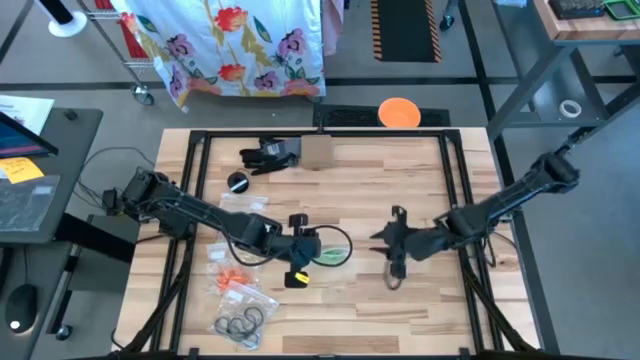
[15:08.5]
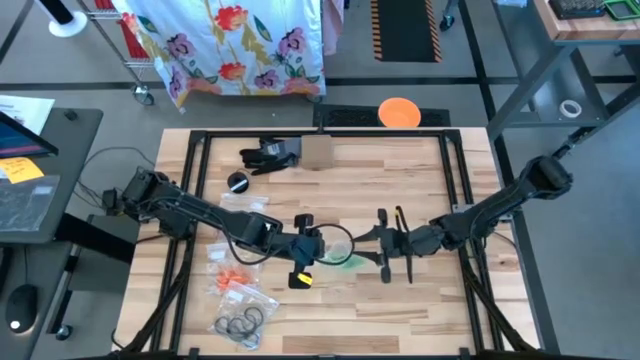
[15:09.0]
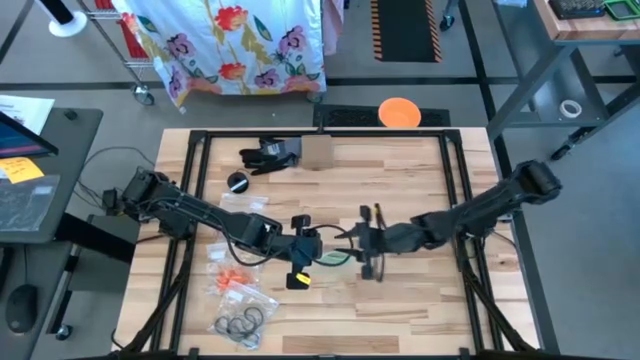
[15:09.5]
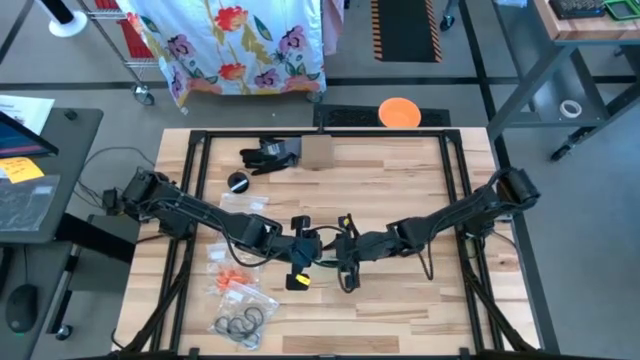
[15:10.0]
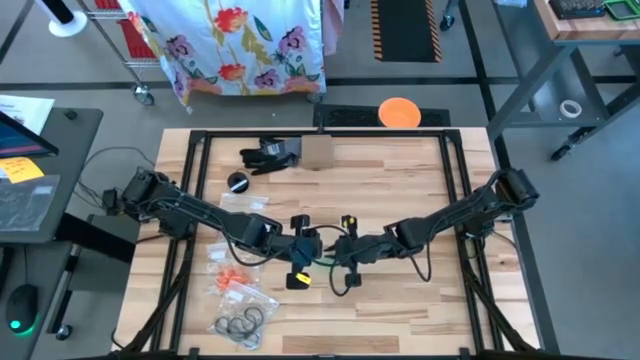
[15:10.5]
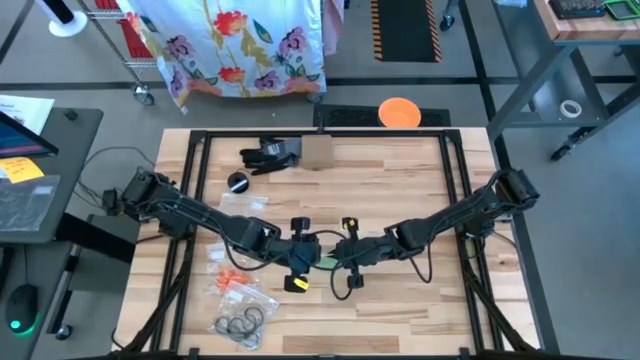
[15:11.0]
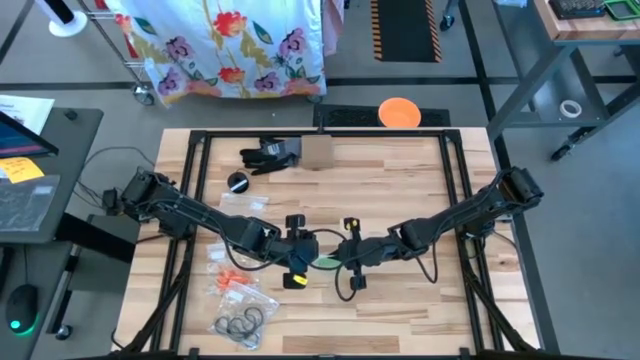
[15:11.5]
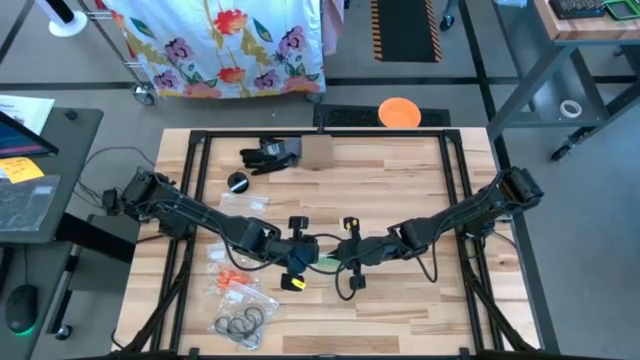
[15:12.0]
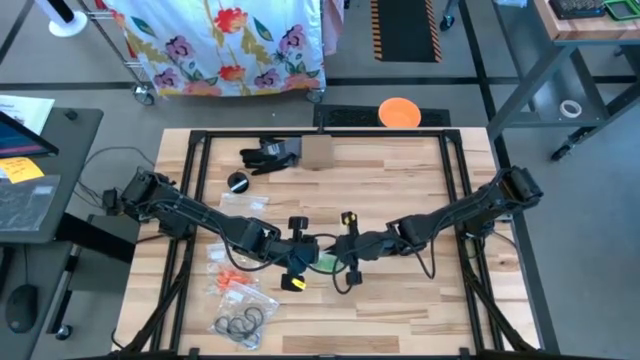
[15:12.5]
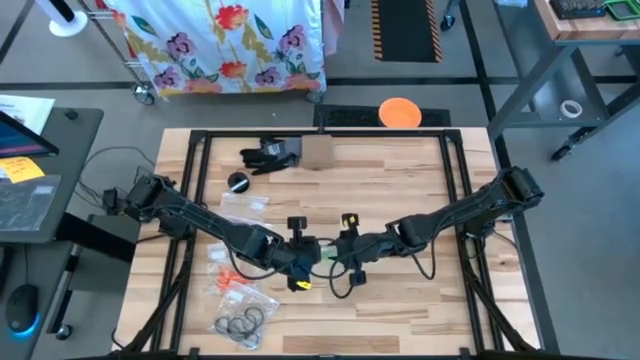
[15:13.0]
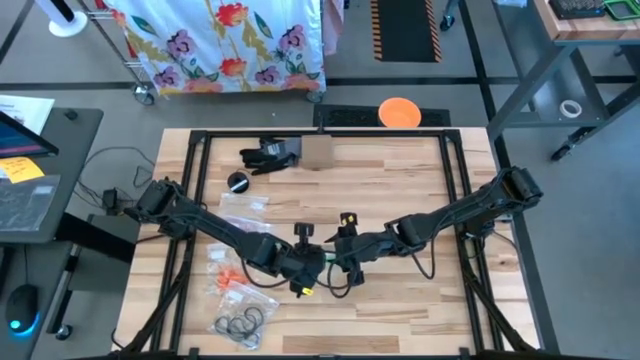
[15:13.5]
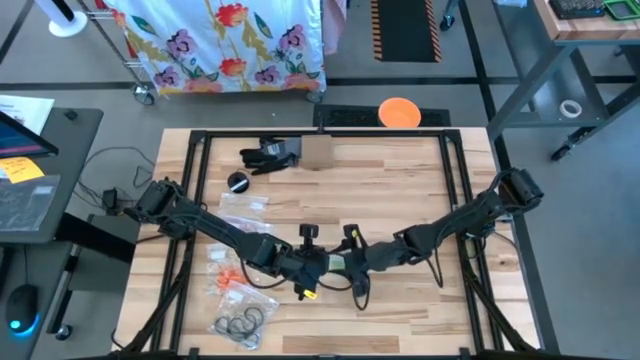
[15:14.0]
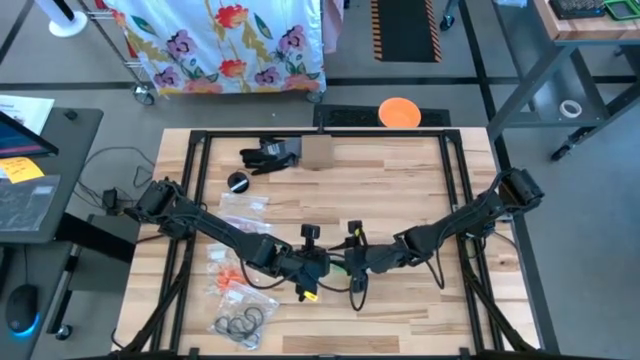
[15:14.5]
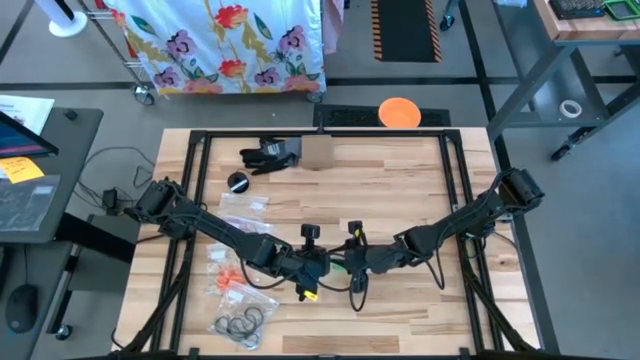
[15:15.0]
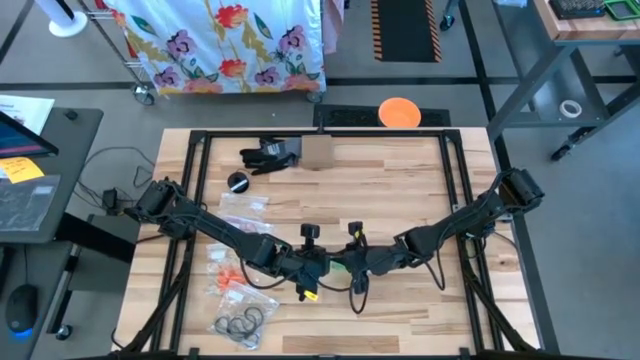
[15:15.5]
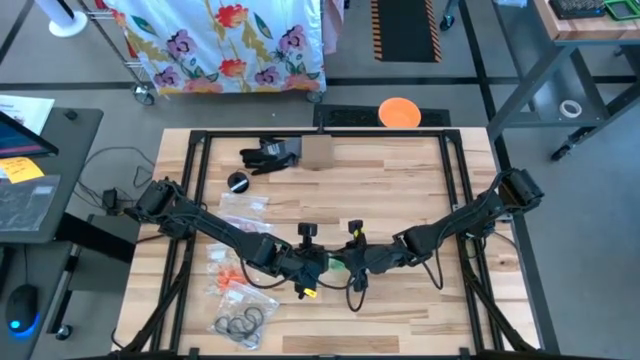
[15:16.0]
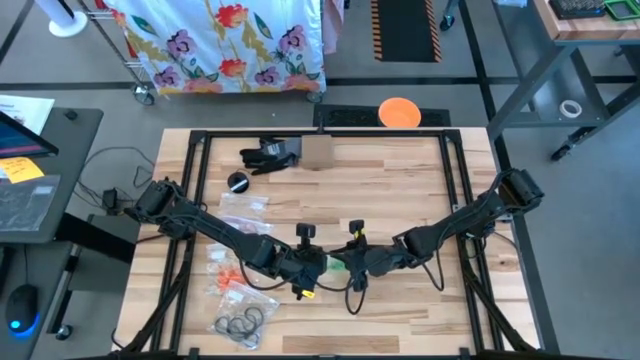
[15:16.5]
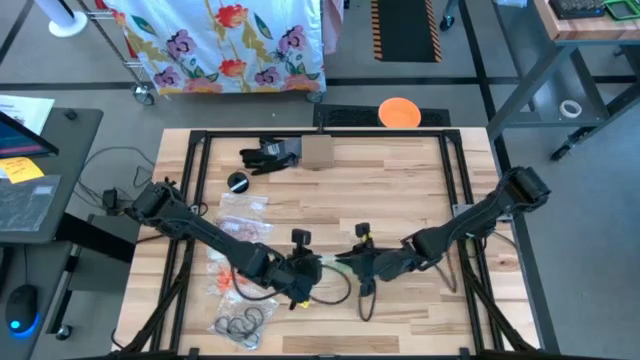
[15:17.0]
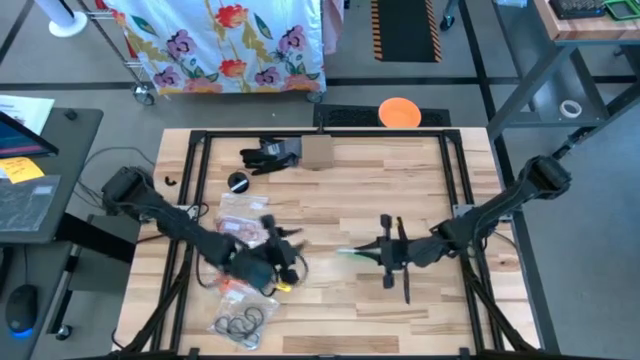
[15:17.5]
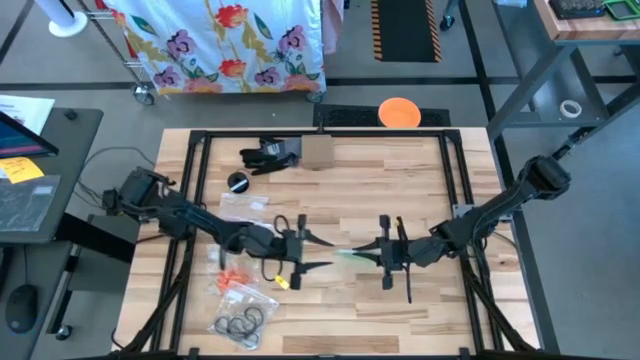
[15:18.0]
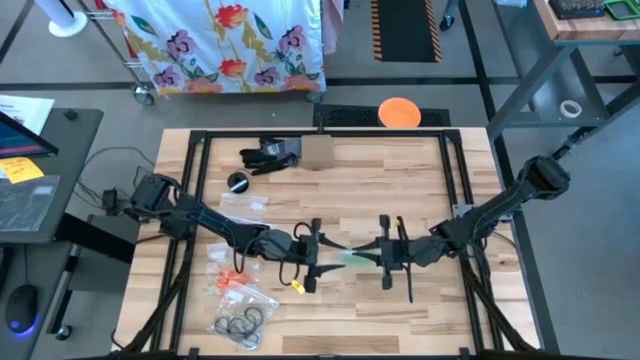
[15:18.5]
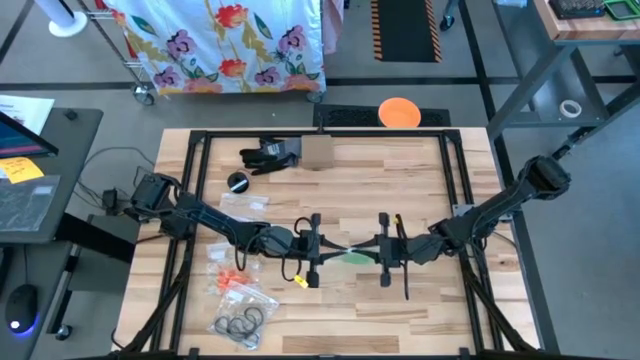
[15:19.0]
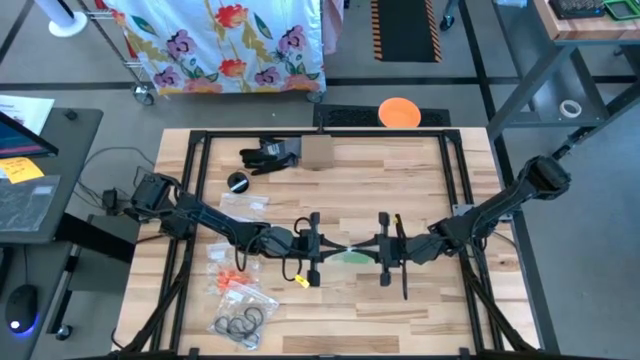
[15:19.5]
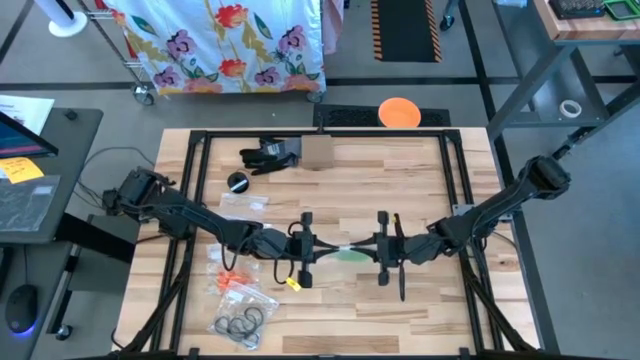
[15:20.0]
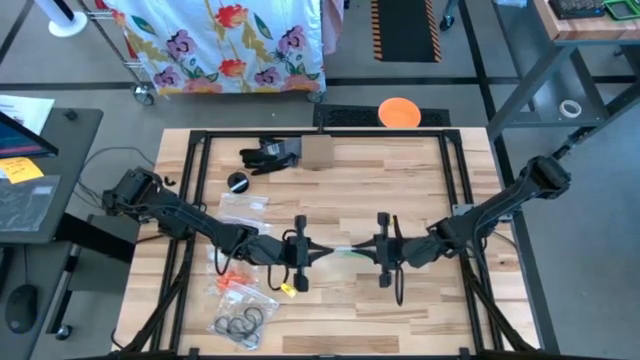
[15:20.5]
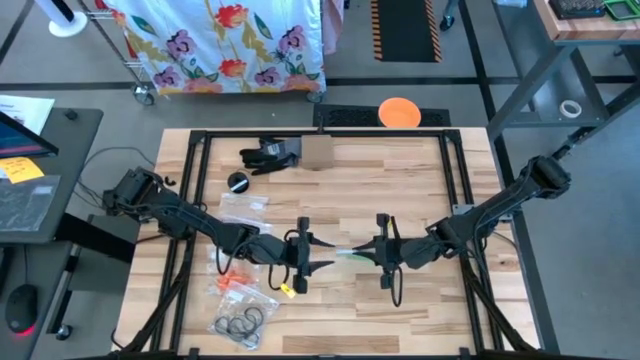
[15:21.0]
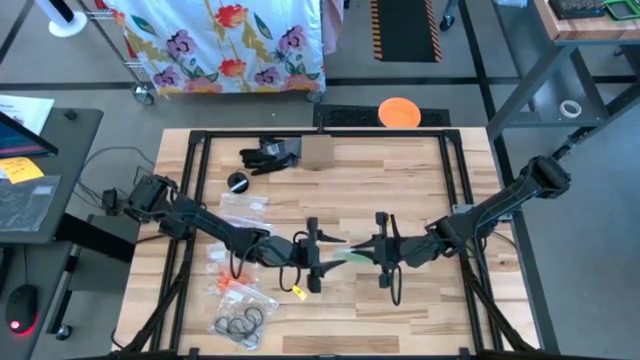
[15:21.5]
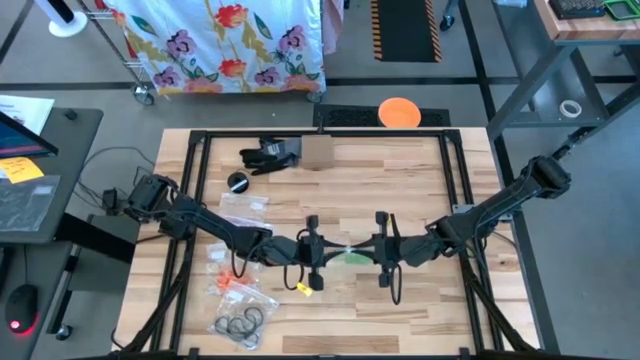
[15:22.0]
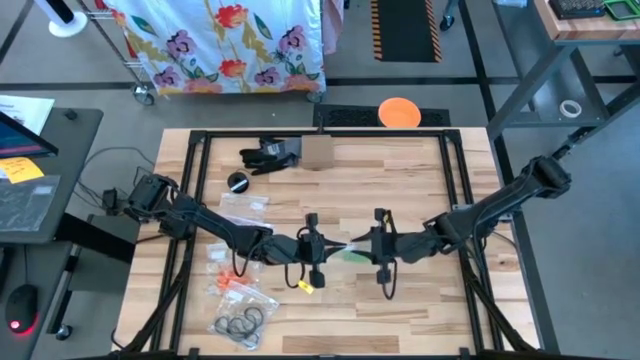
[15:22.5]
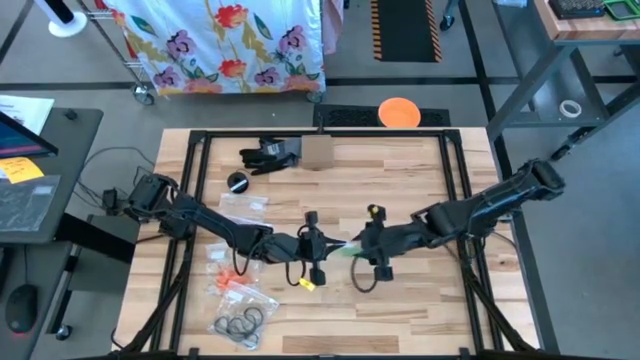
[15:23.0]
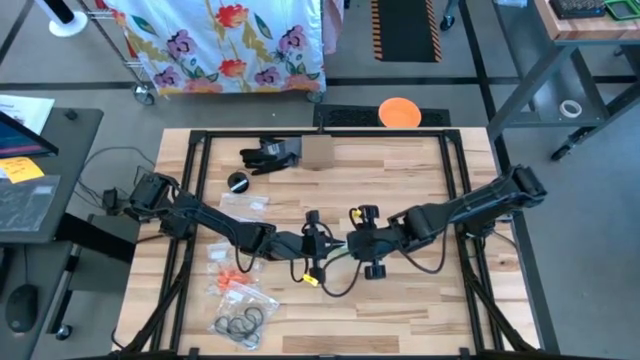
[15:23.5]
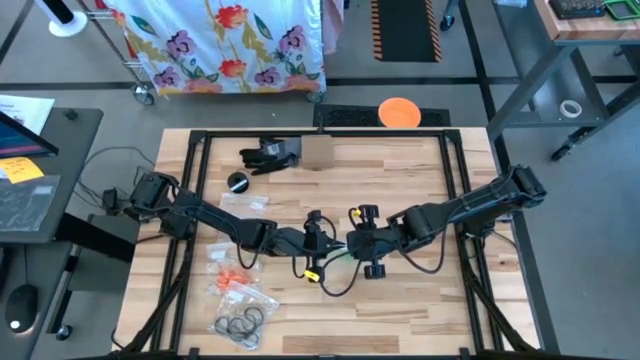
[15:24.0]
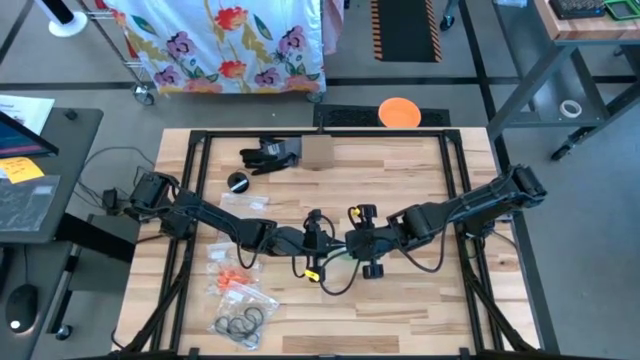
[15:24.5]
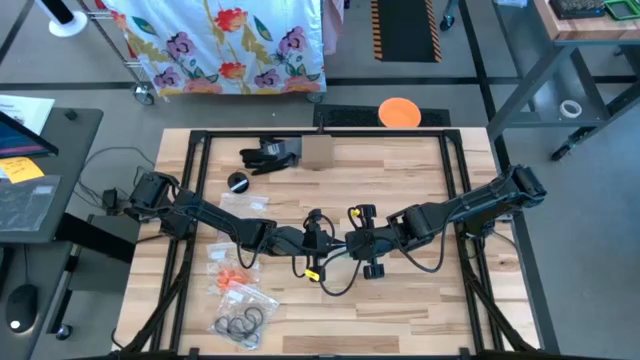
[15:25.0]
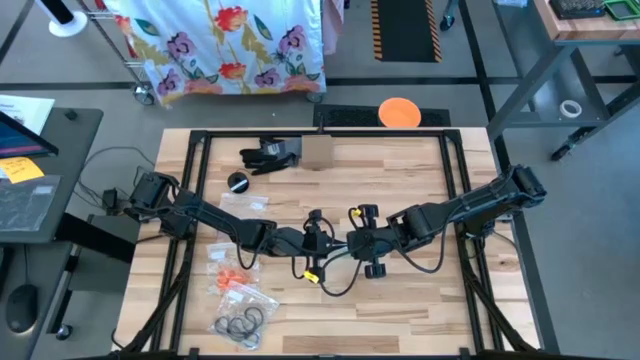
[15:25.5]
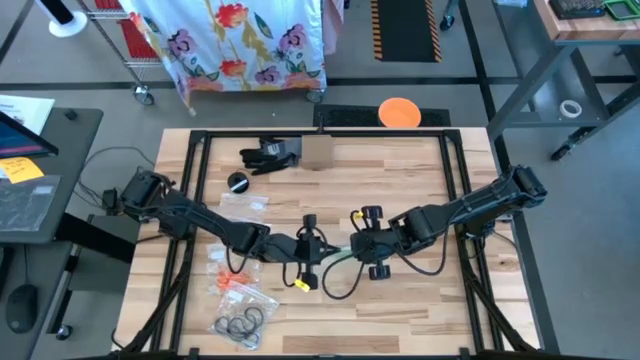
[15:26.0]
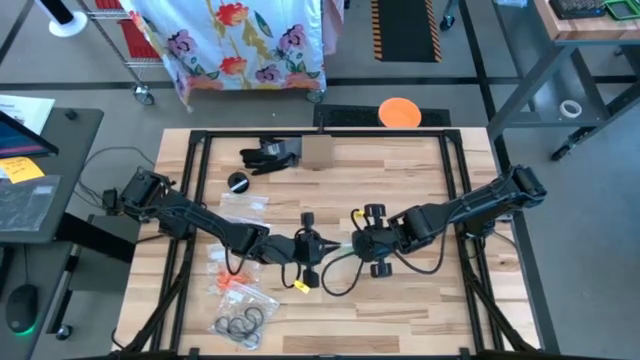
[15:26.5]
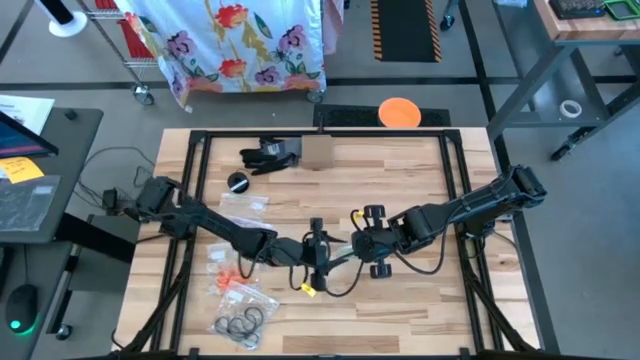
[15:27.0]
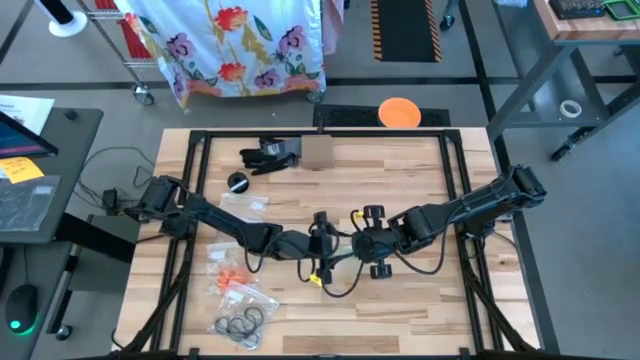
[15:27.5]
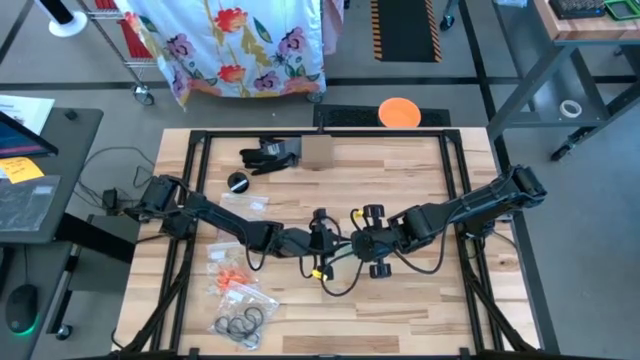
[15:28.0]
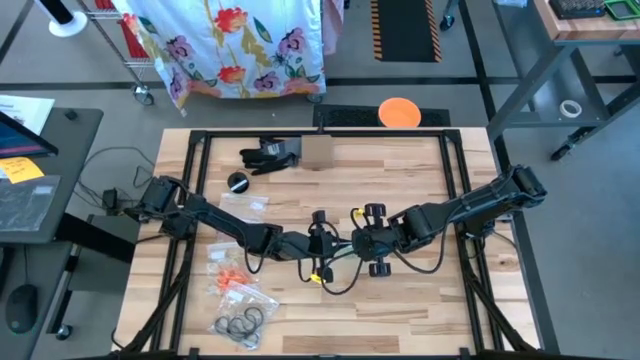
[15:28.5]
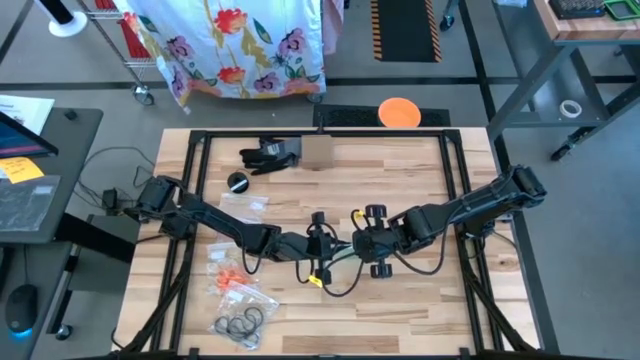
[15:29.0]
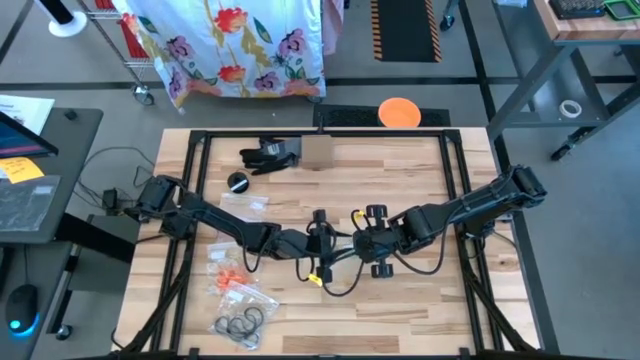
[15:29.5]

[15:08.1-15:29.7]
Task: Sort rubber bands
Close the transparent zip bag
